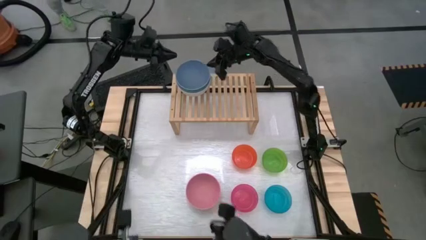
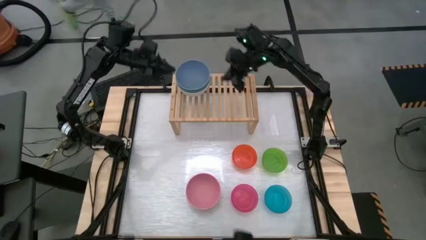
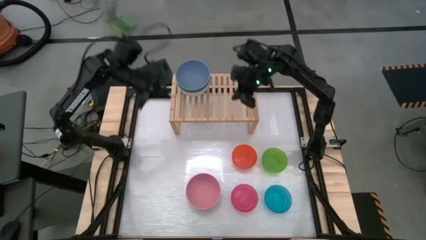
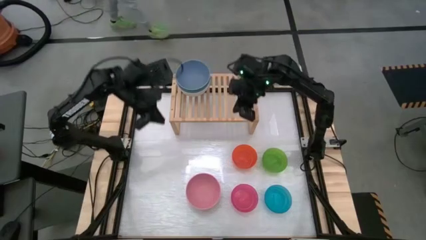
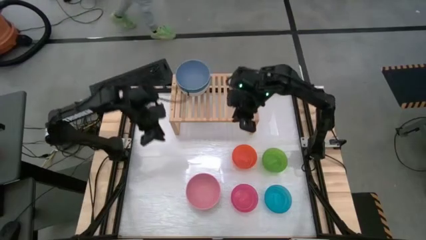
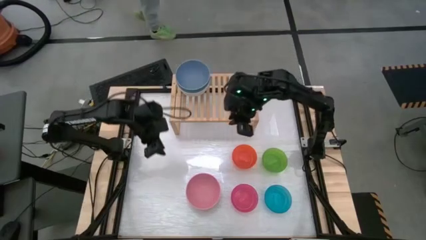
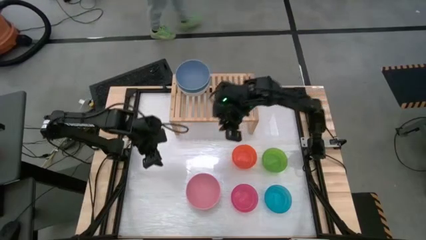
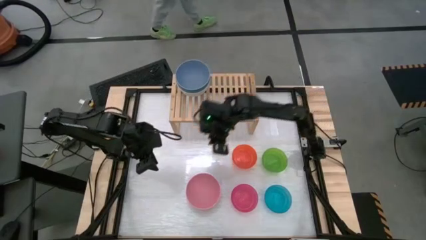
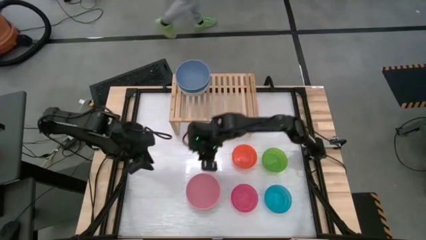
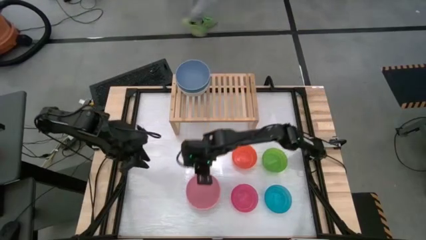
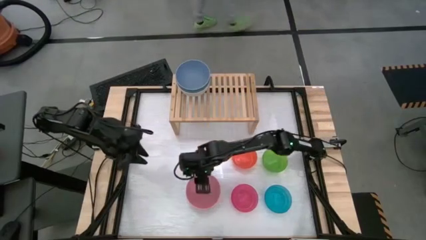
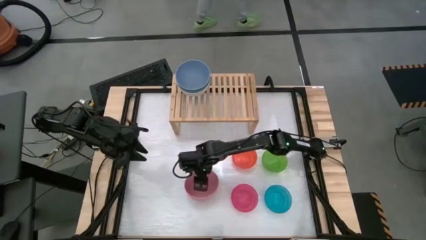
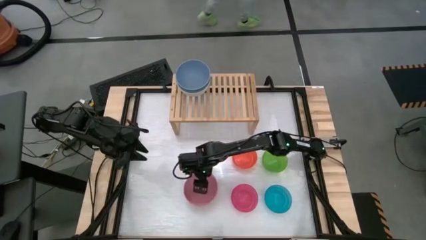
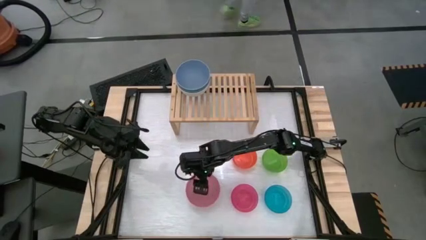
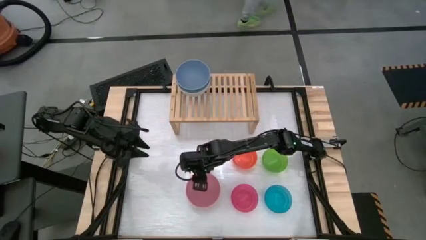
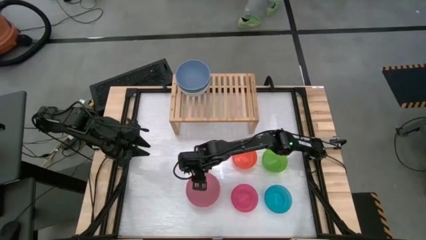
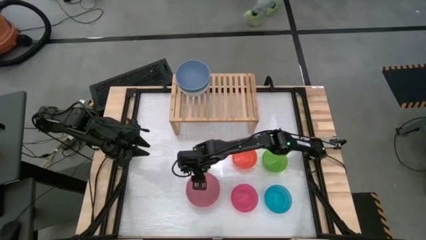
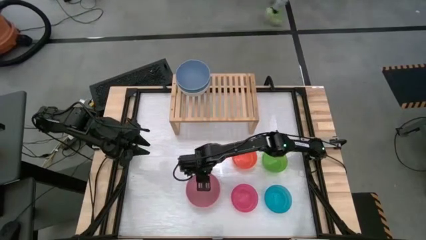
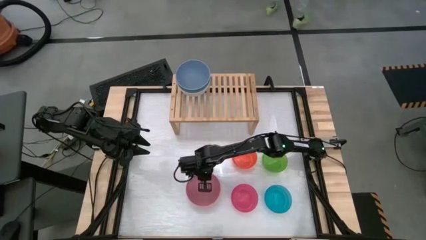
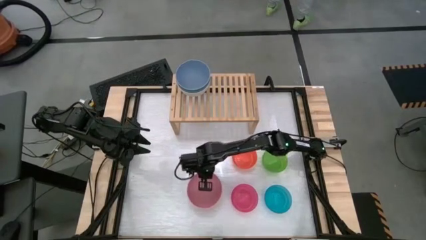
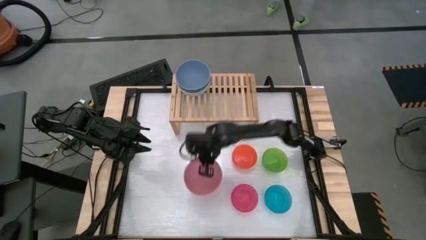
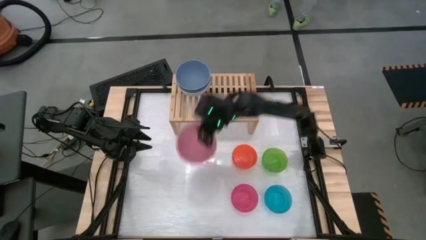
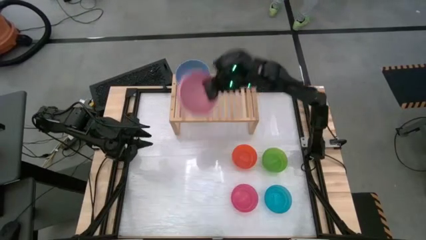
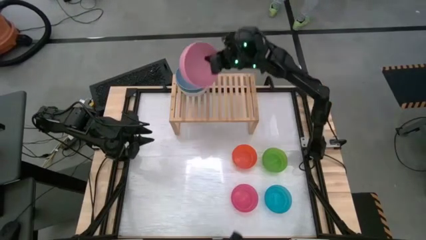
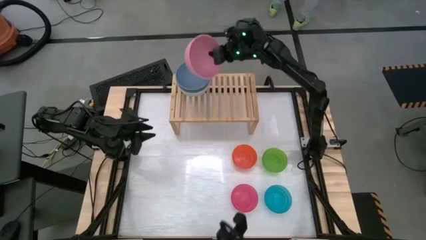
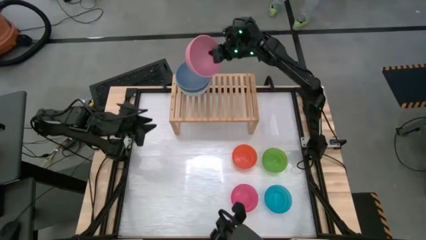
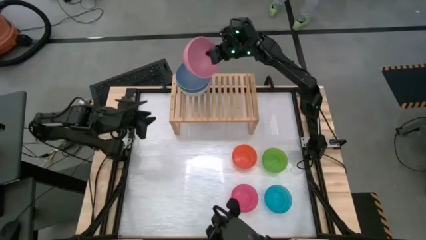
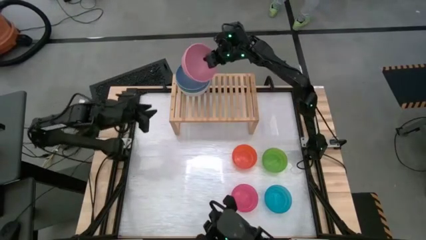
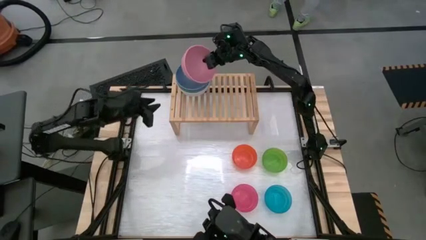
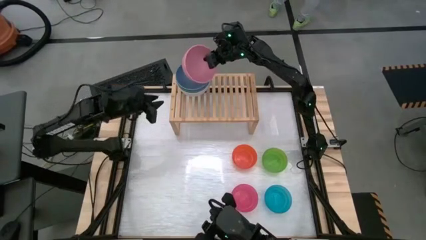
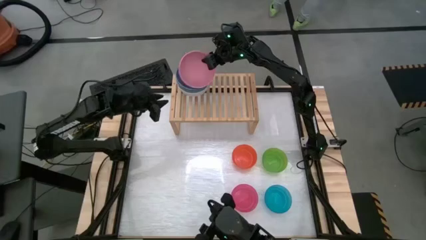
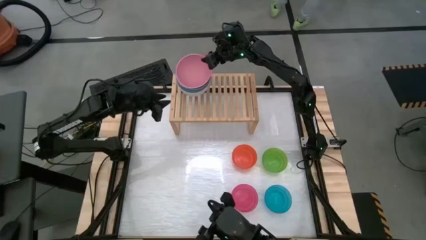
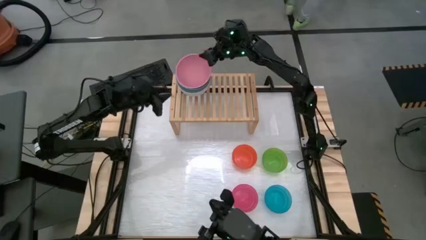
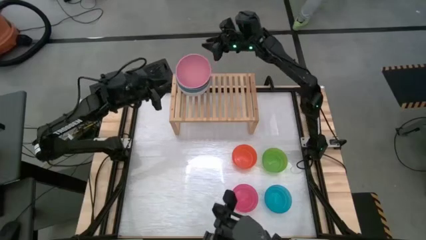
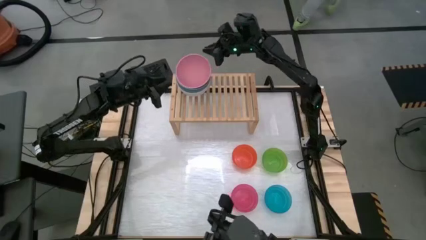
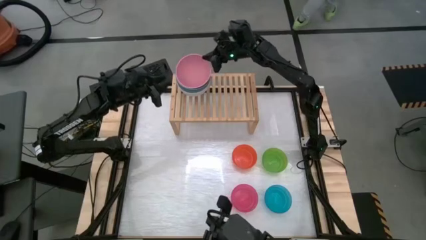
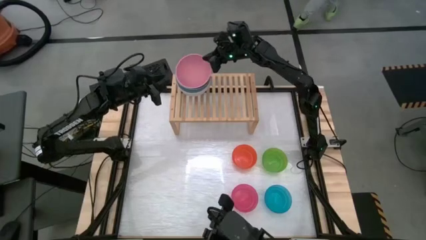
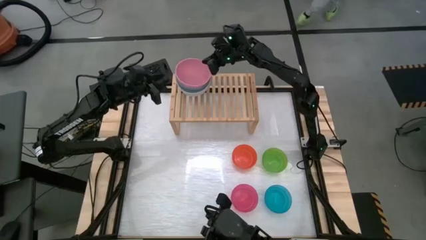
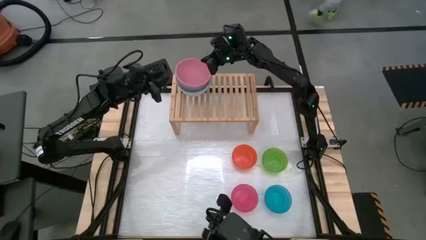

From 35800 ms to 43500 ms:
Task: Place and stack bowls onto a shelf
Stack the large pink bowl on top of the large blue bowl

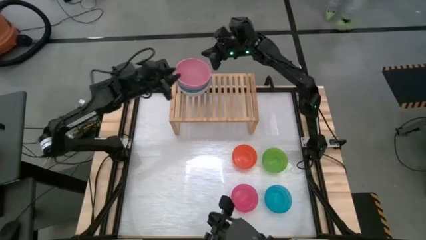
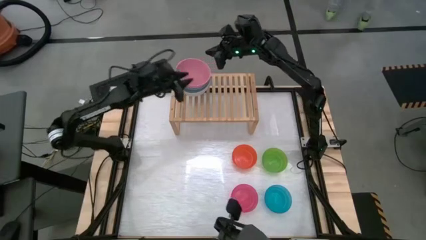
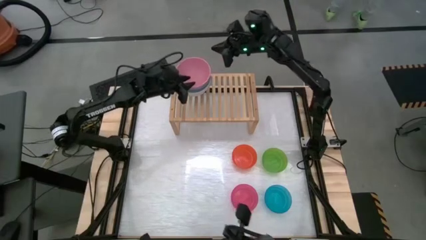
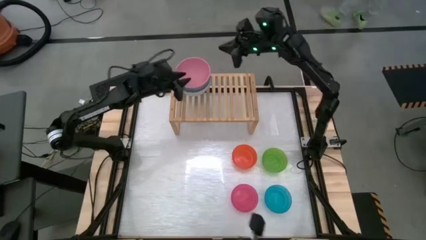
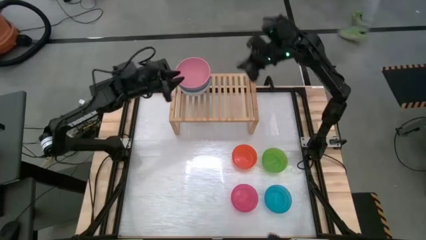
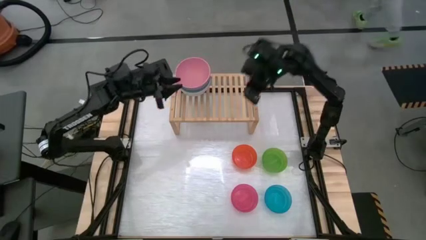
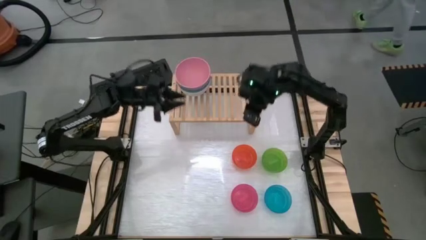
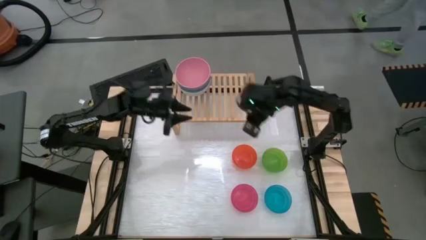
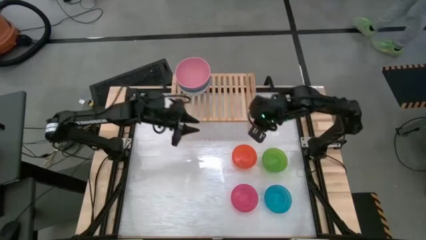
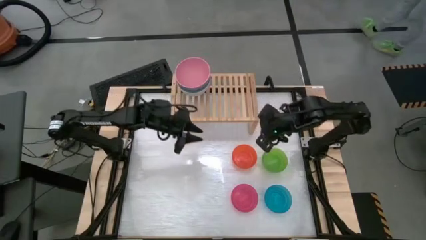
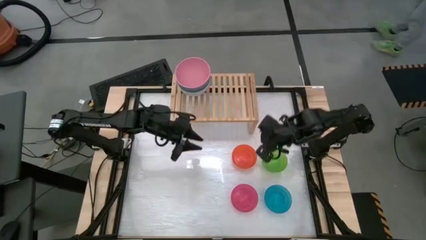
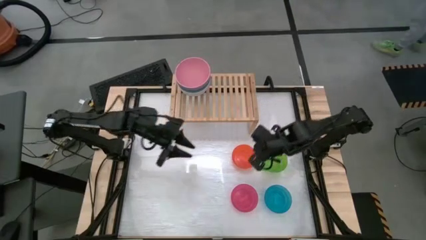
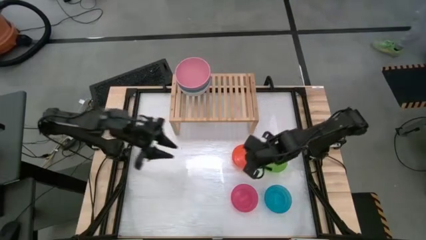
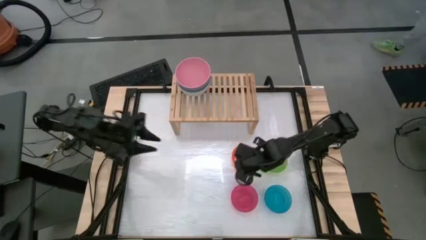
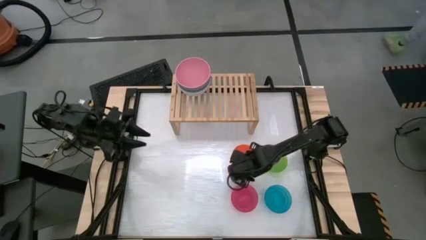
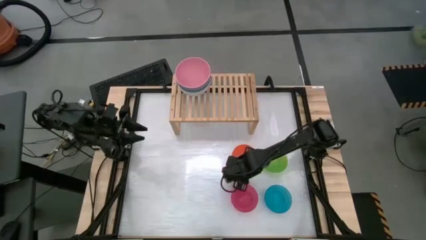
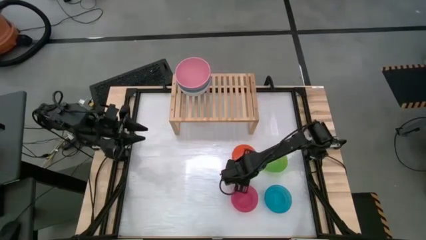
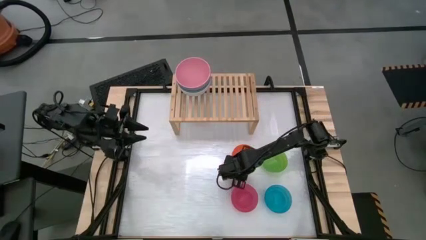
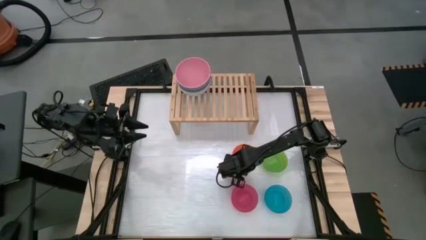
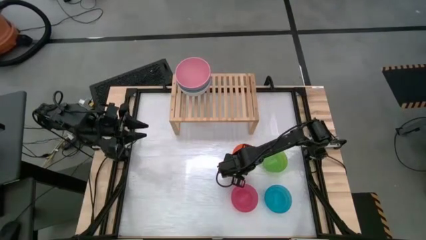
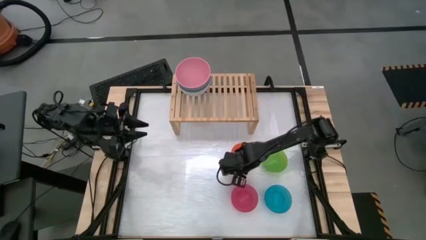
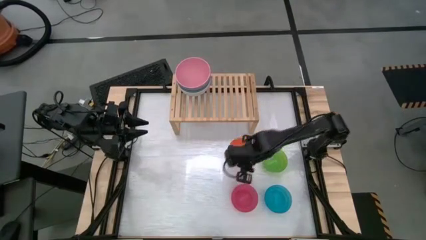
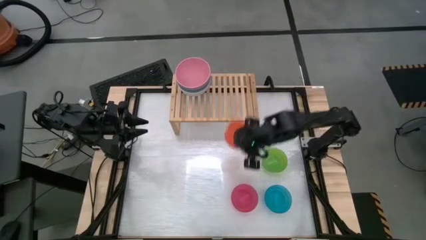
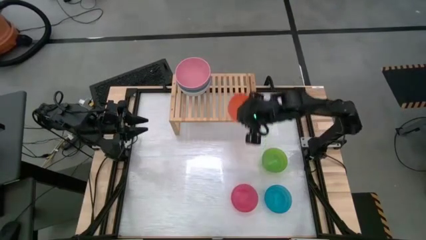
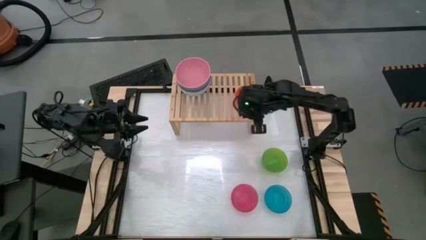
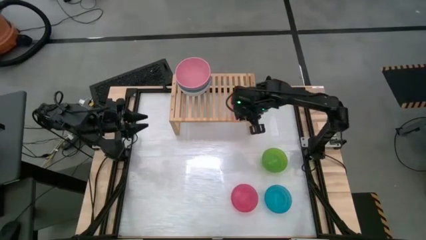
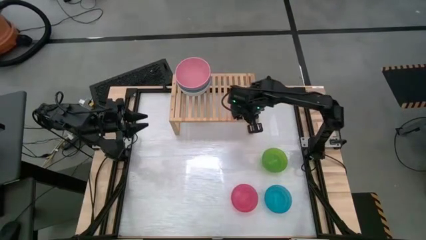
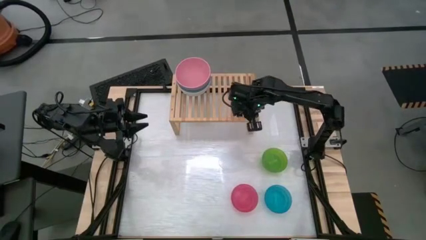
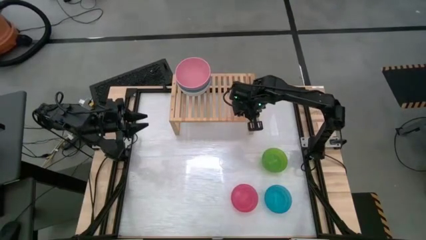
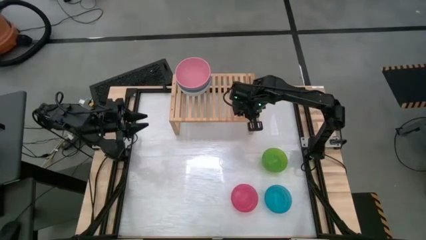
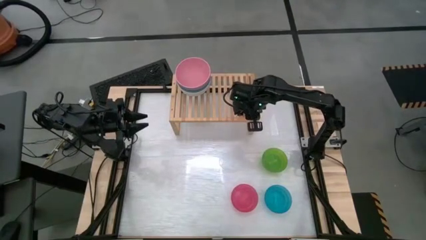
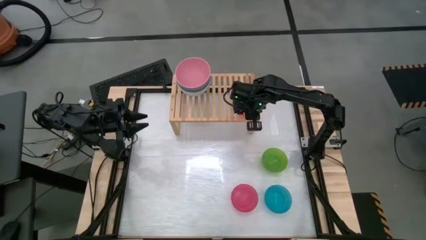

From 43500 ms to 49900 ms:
Put the small orange bowl on the shelf

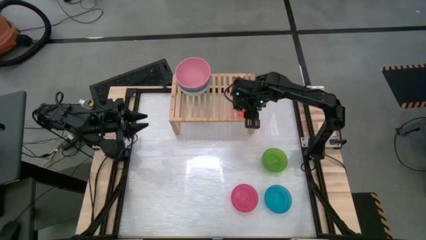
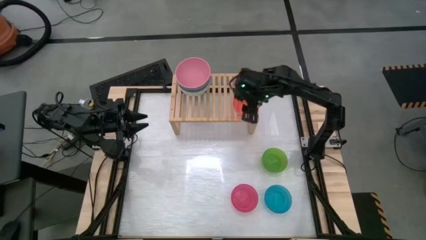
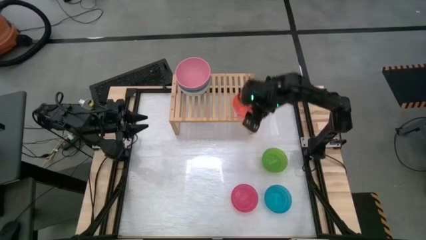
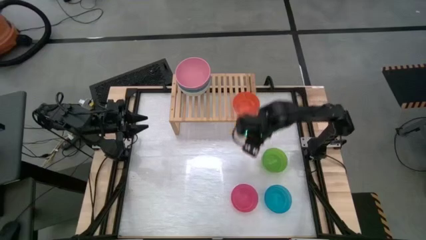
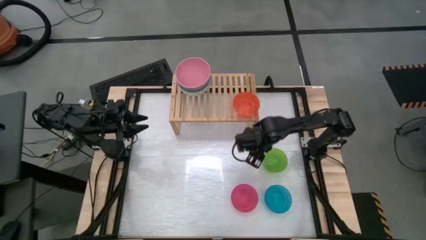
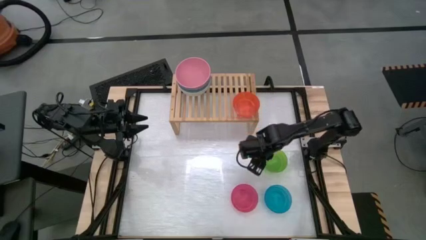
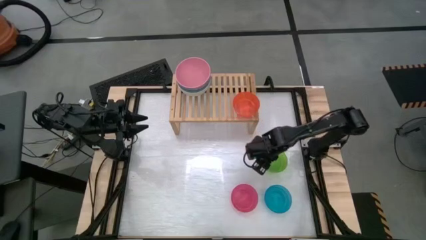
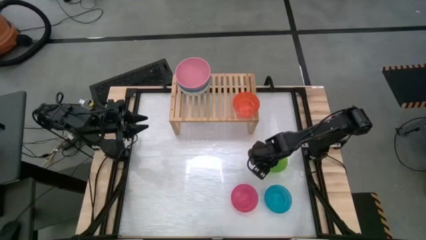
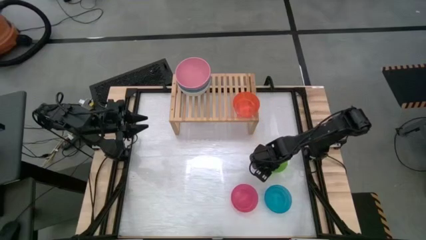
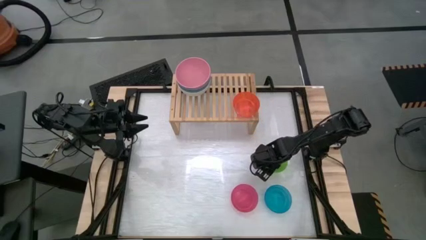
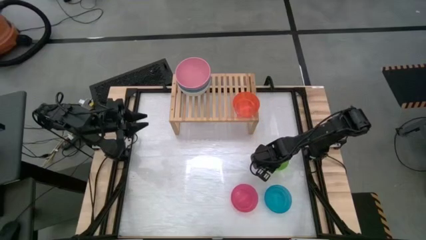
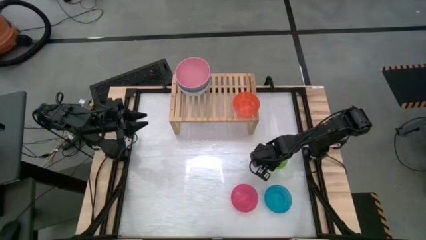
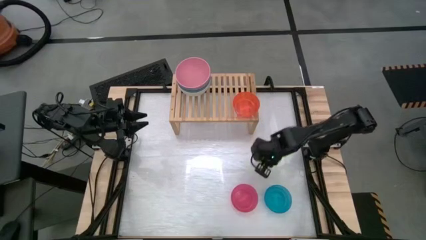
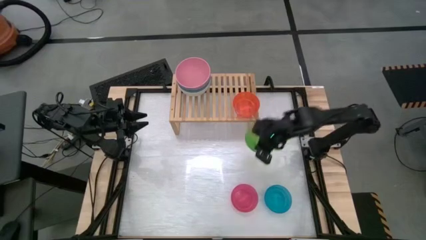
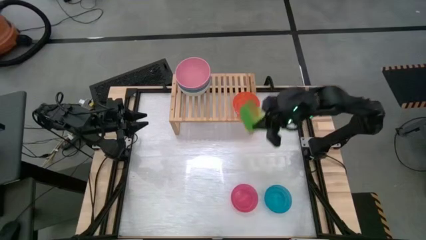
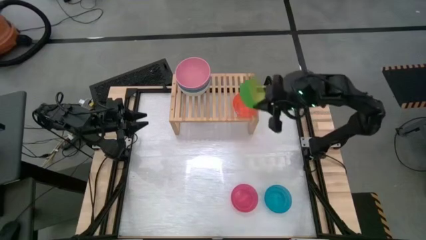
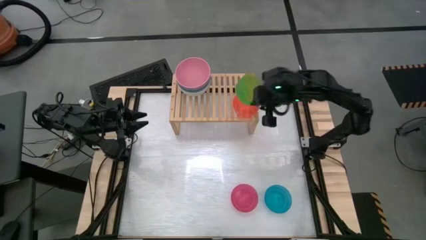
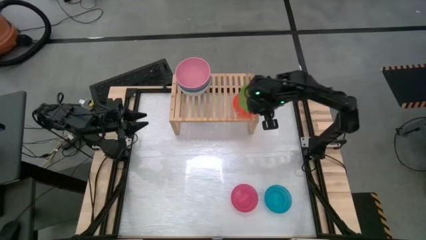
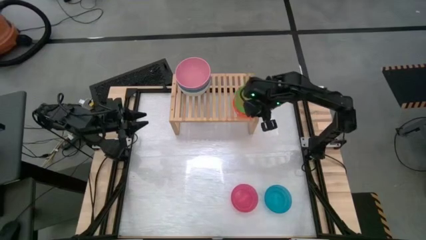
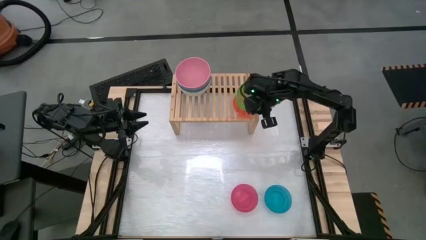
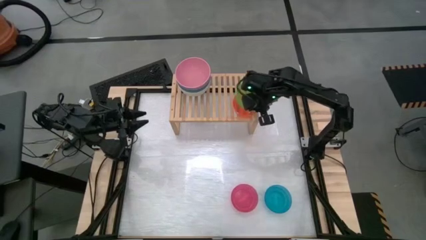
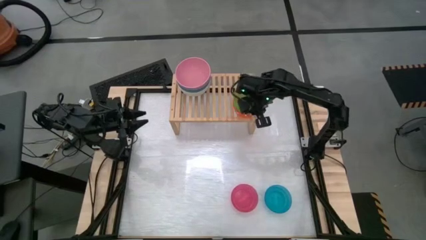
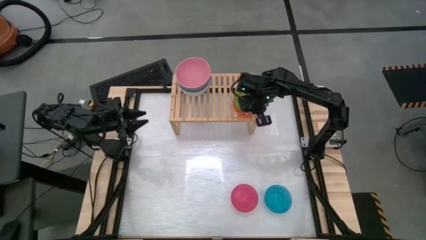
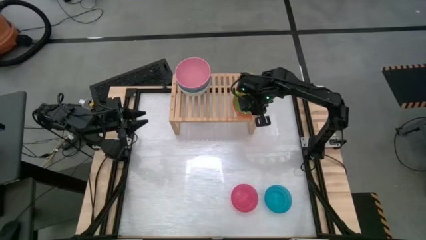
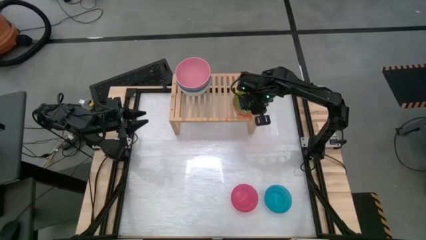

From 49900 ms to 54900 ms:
Stack the small green bowl on top of the small orange bowl
